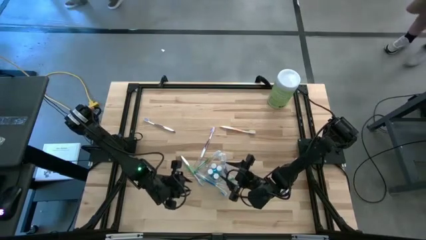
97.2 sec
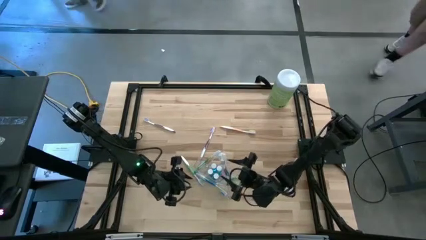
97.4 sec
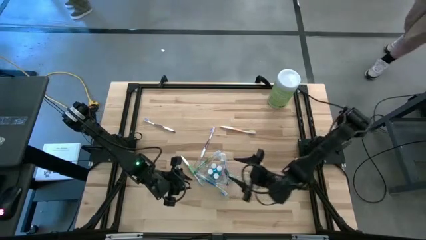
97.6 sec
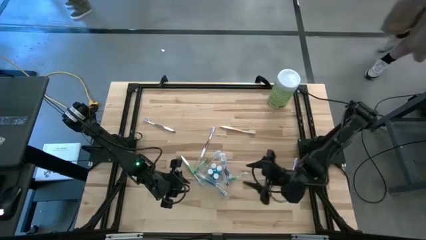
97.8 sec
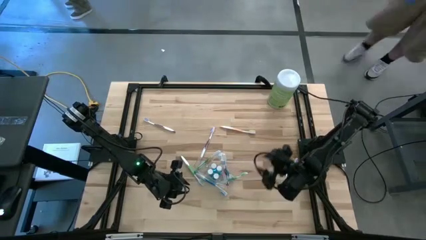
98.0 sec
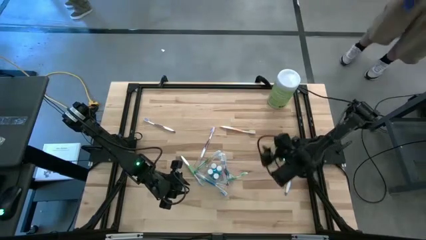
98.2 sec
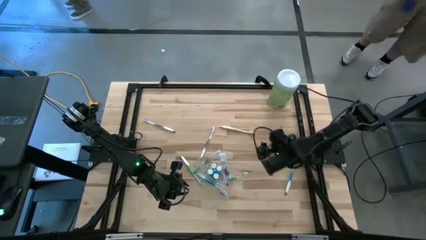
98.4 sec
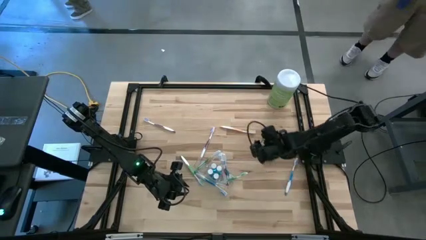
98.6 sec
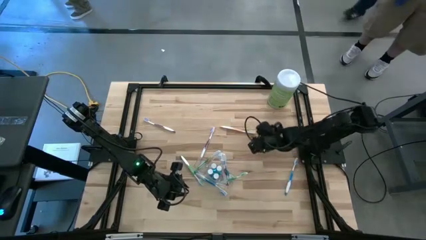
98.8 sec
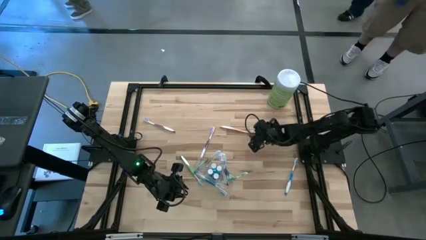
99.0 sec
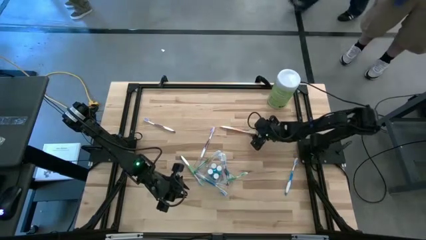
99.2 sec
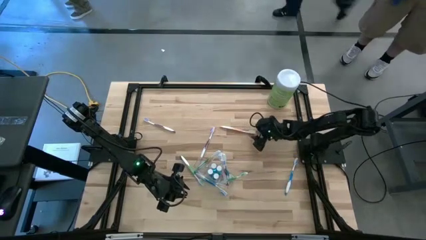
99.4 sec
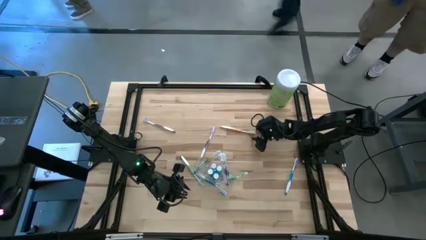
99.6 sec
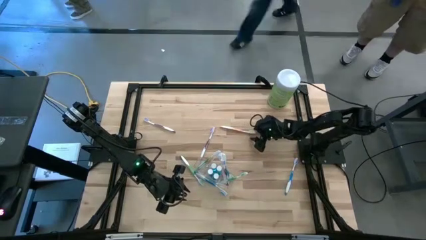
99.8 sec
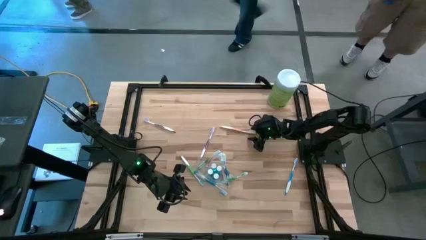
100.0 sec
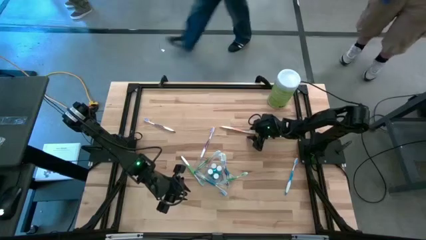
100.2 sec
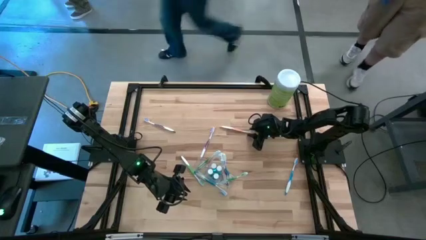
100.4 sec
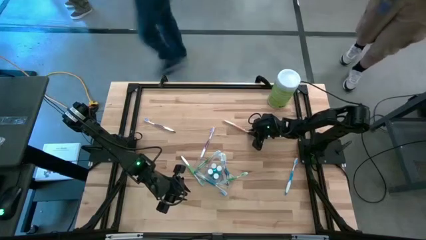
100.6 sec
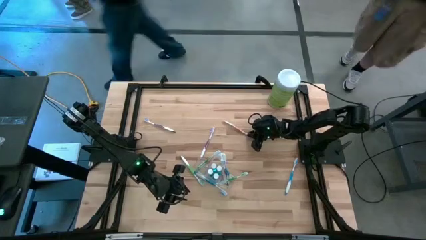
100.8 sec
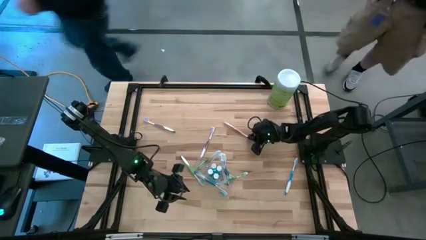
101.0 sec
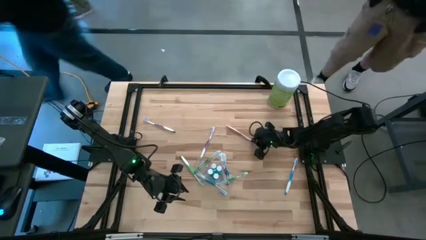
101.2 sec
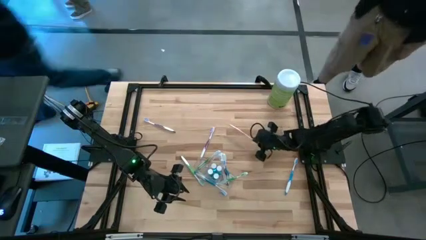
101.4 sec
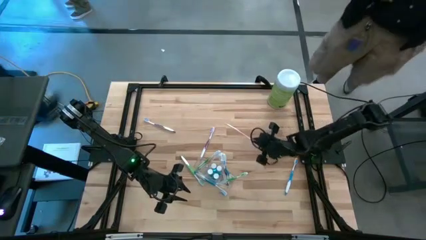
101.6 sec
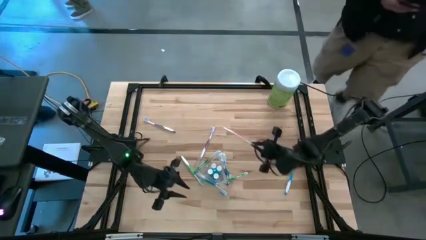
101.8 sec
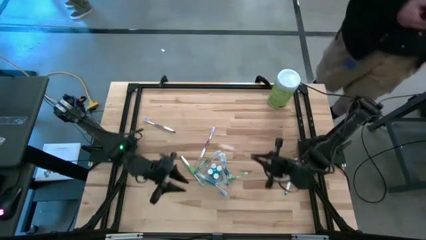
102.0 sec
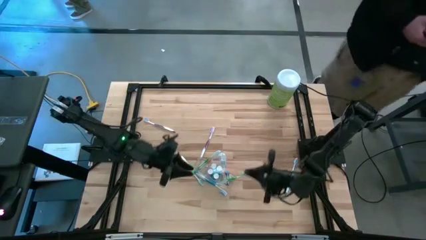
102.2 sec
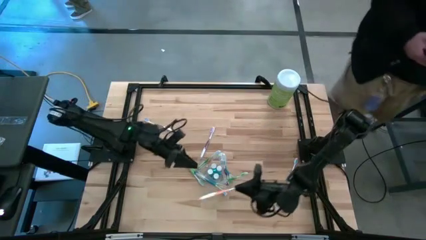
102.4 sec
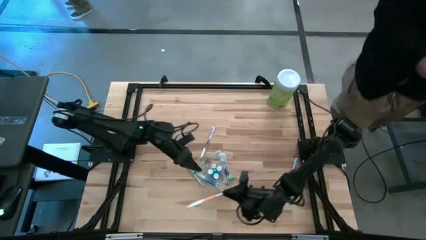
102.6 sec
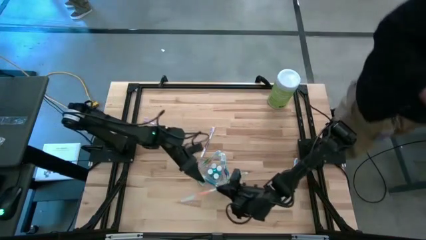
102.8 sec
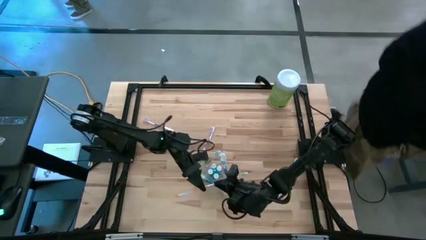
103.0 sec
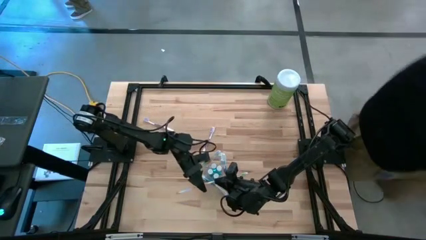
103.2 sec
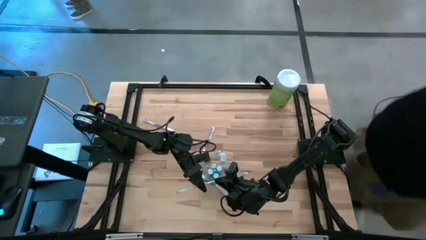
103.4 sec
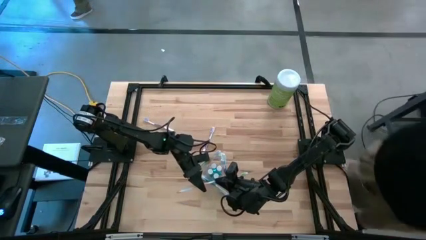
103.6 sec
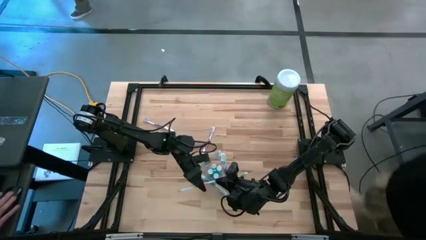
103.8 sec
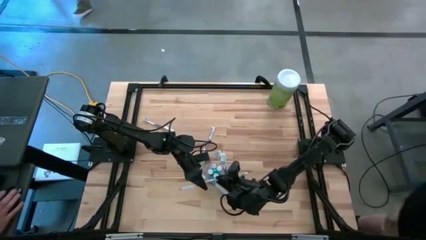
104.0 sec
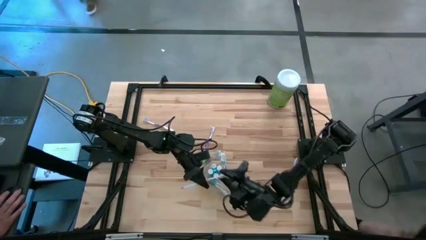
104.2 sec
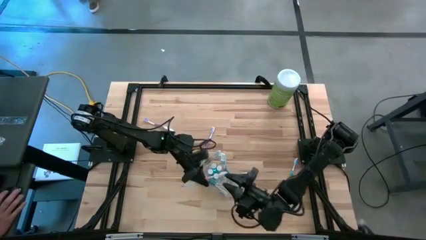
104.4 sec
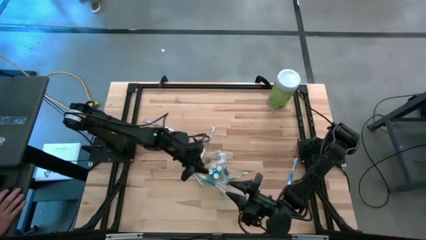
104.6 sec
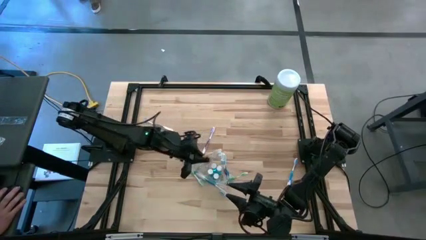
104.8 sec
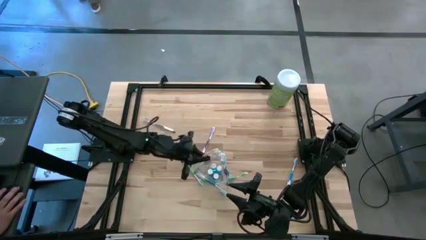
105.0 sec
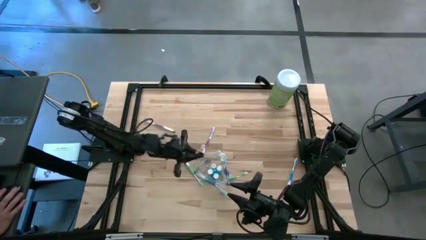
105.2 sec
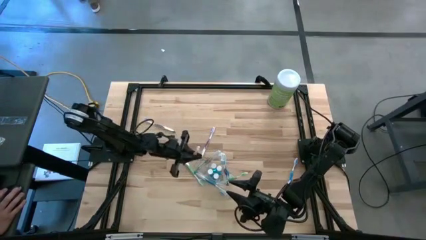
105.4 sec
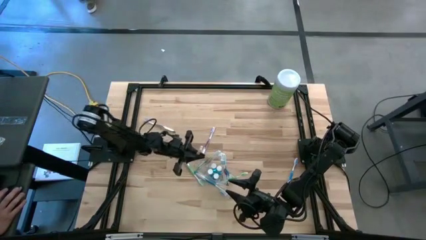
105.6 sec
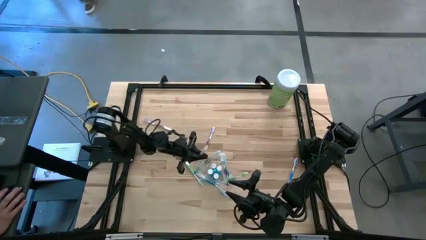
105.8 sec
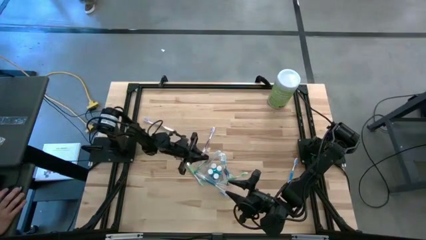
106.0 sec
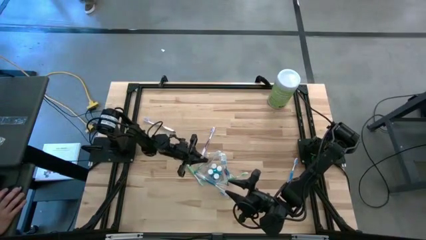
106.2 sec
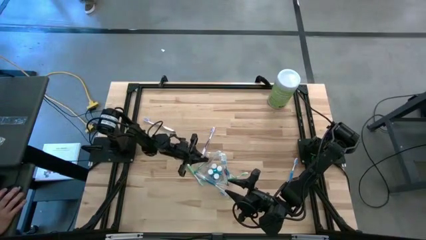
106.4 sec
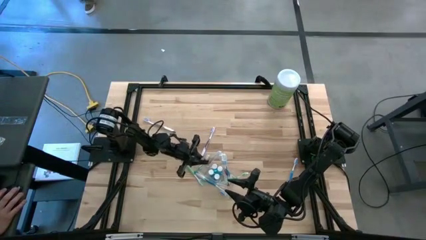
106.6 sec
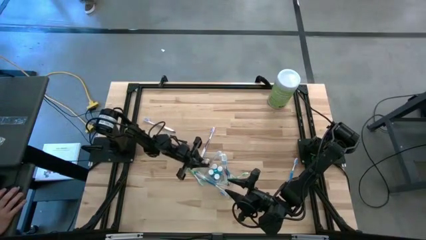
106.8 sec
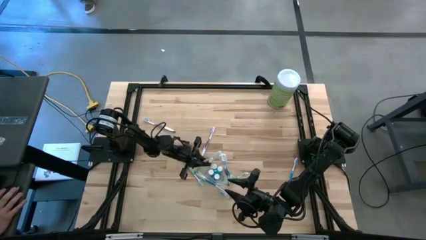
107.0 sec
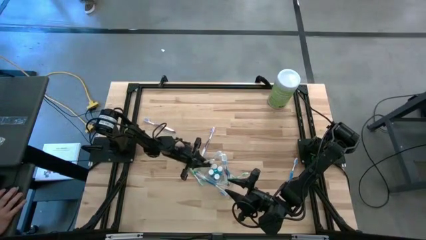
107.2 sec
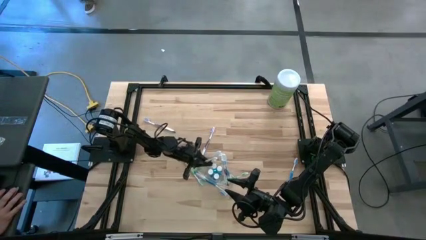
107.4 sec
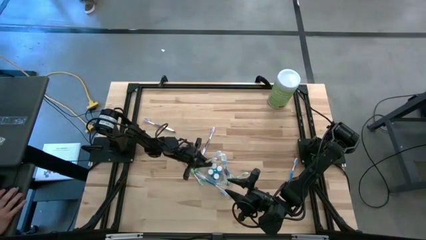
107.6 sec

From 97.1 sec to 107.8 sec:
Task: Pick & Place toothbrushing station
Put the orange toothbrush into the transparent organizer

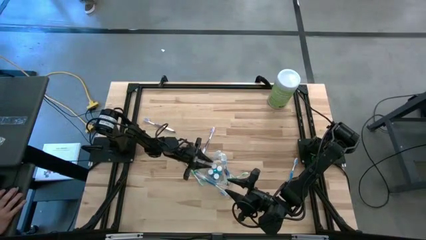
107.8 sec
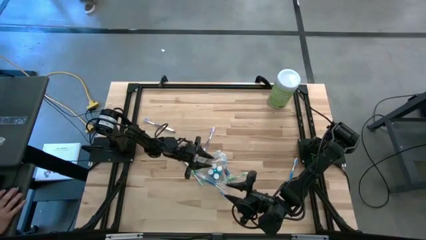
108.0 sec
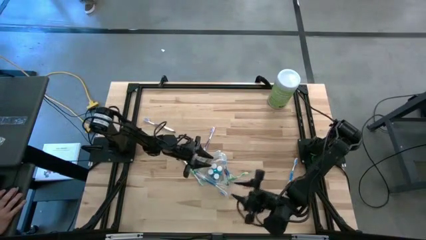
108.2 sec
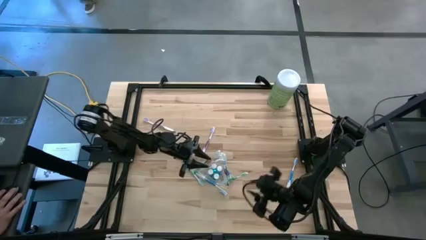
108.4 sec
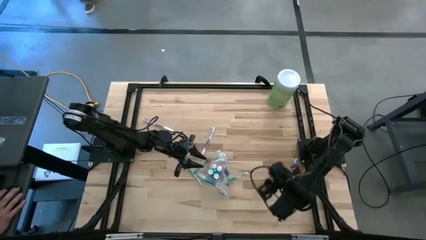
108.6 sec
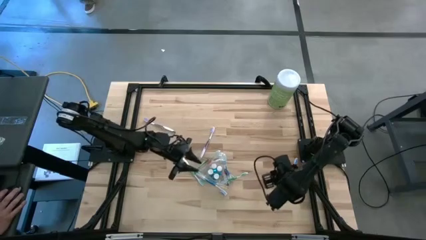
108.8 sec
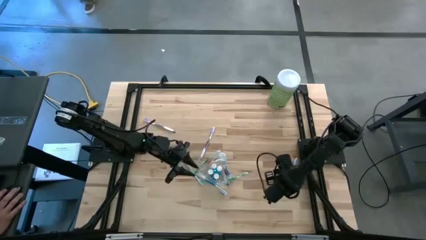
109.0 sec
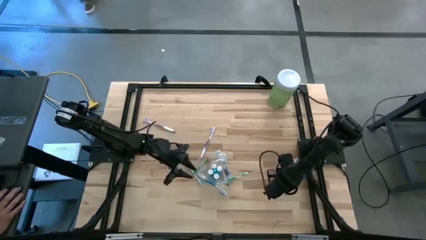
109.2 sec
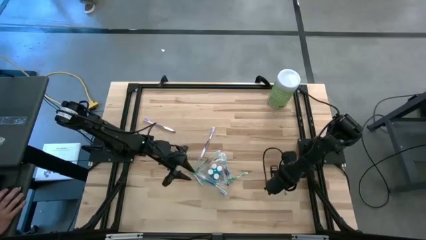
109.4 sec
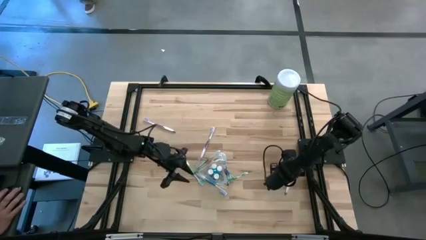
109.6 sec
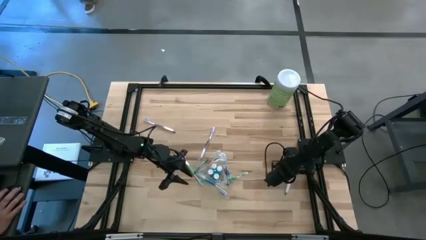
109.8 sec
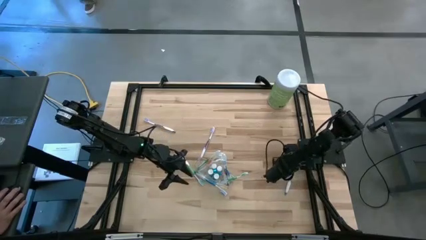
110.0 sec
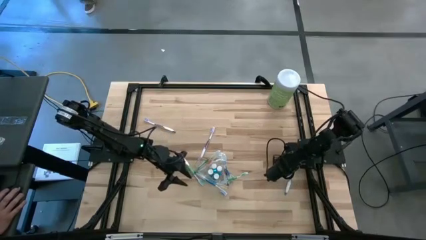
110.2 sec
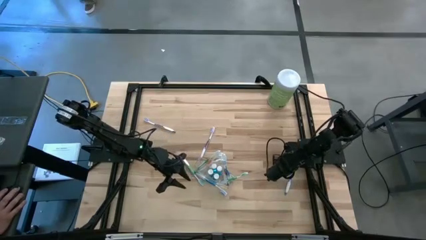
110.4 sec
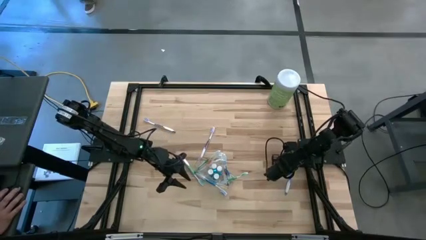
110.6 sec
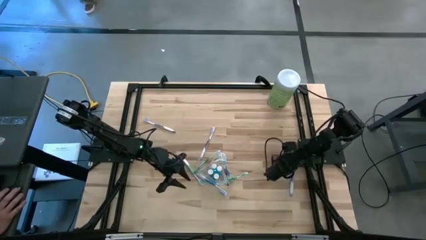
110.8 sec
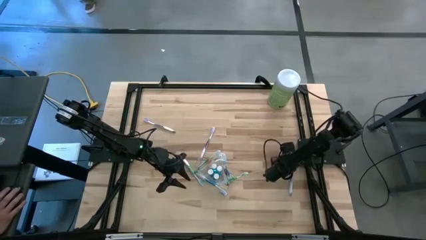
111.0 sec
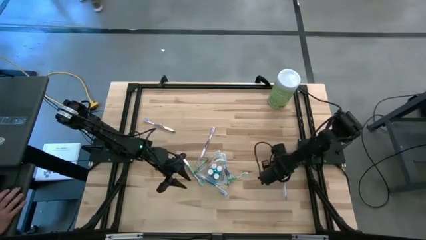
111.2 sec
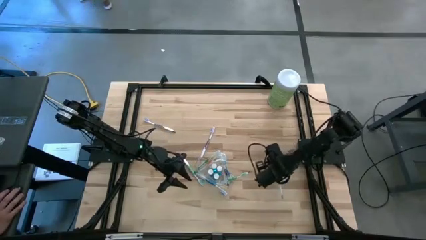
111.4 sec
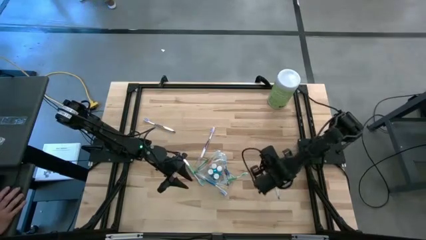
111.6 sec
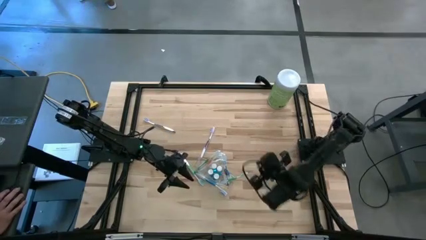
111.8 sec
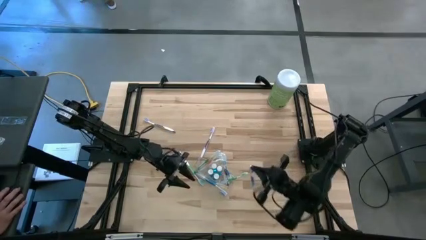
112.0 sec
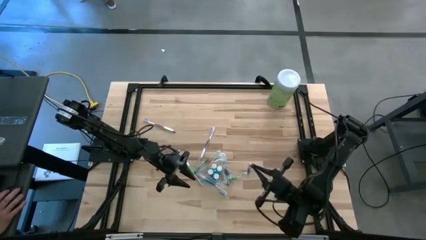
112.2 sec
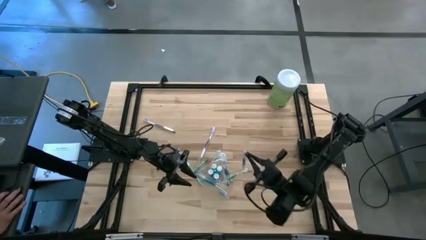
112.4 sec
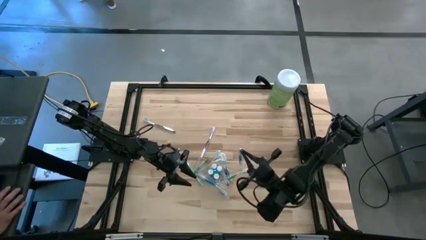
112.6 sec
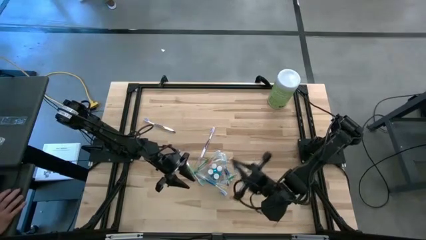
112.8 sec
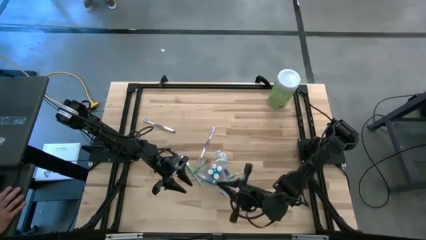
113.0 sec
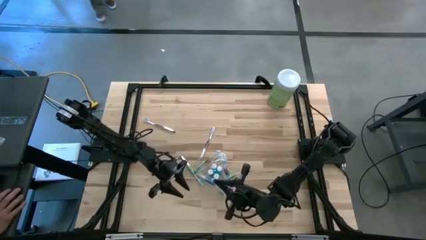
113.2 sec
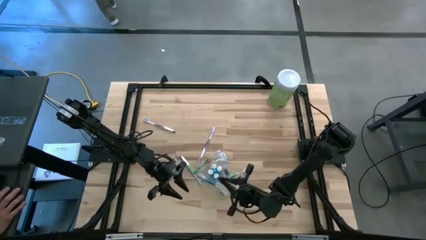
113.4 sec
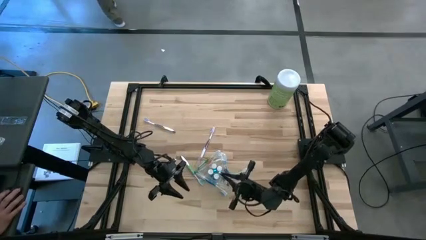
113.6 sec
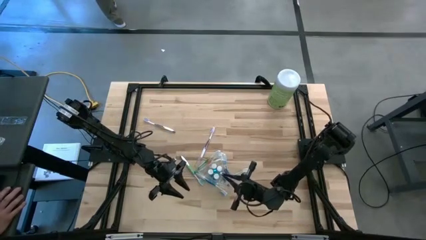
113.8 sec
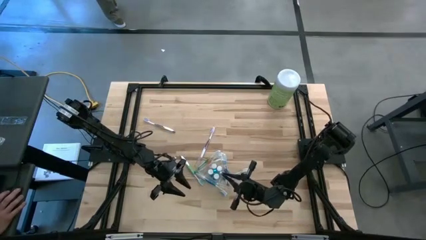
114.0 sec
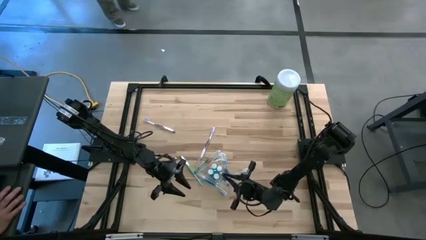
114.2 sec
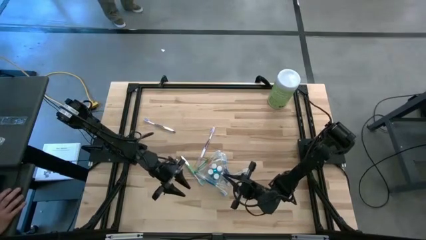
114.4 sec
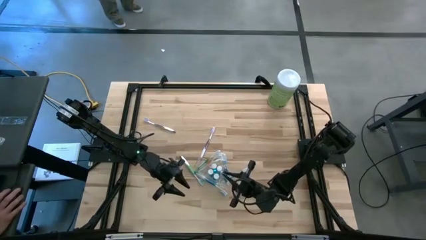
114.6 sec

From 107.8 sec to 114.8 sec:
Put the blue toothbrush into the transparent organizer
